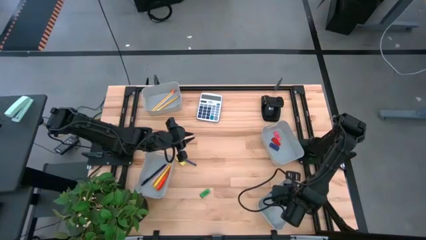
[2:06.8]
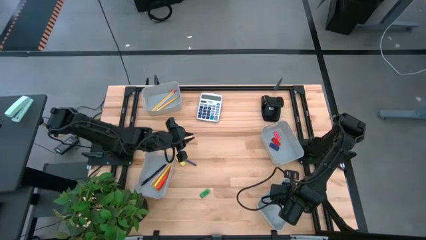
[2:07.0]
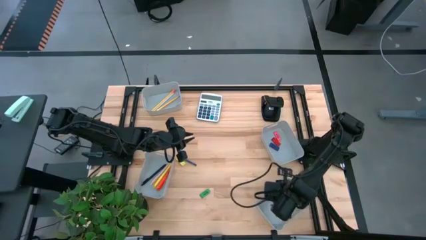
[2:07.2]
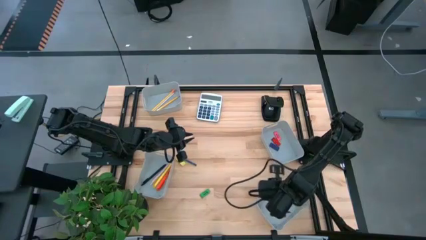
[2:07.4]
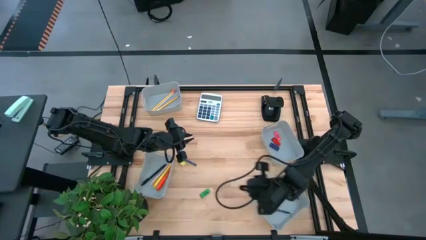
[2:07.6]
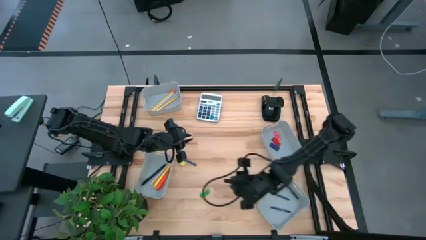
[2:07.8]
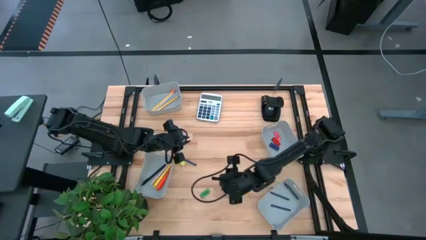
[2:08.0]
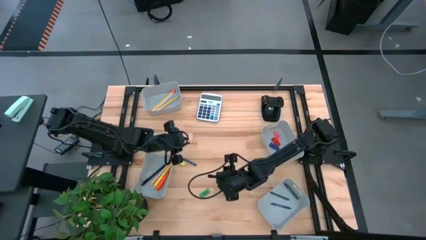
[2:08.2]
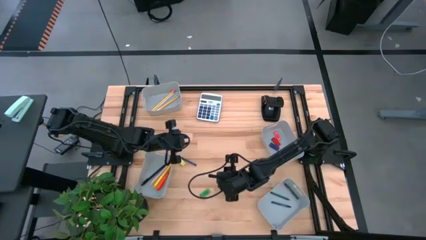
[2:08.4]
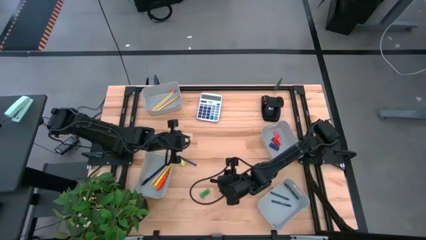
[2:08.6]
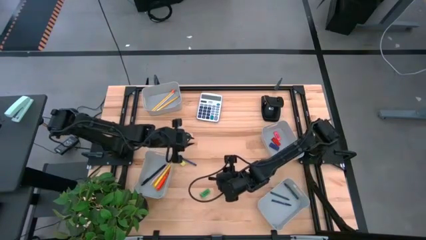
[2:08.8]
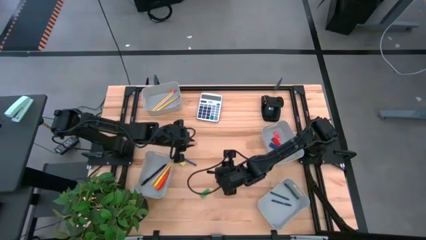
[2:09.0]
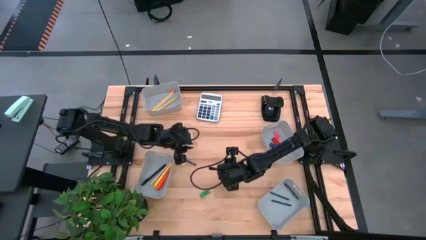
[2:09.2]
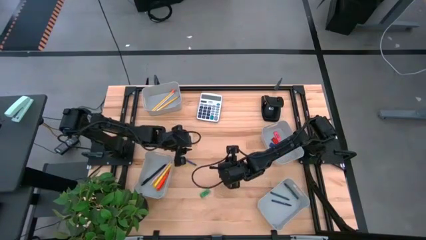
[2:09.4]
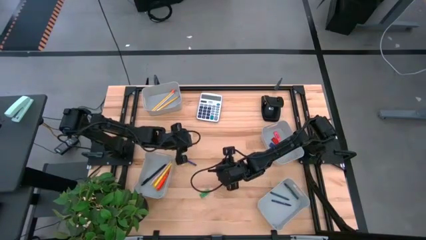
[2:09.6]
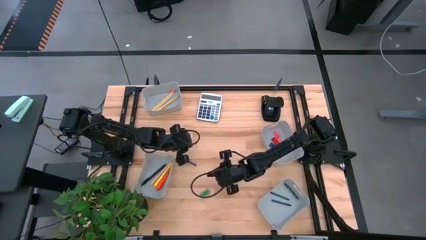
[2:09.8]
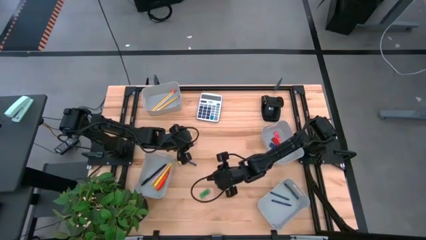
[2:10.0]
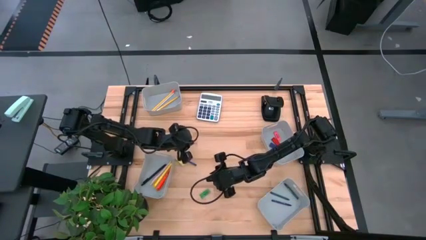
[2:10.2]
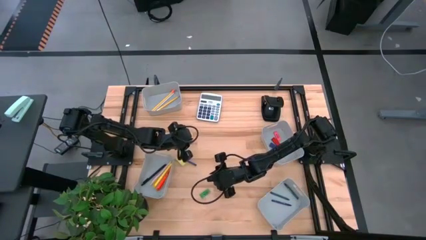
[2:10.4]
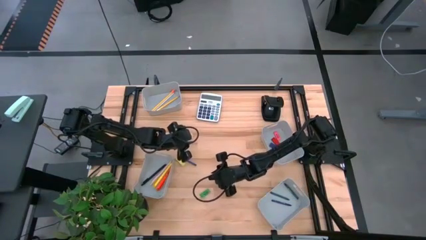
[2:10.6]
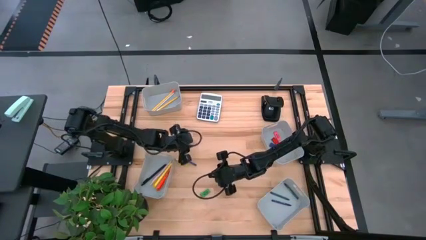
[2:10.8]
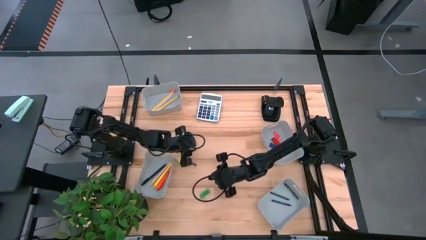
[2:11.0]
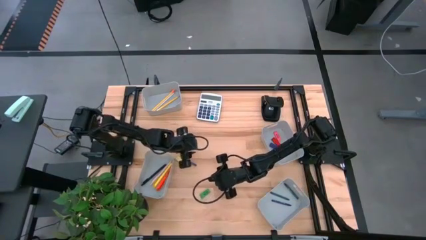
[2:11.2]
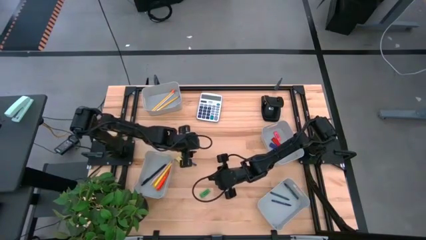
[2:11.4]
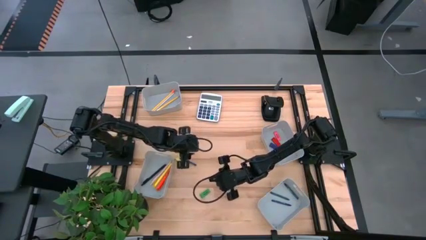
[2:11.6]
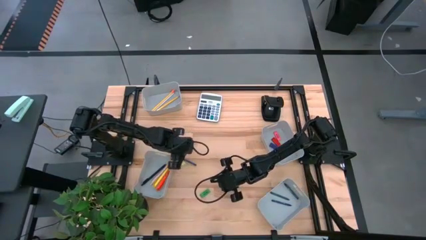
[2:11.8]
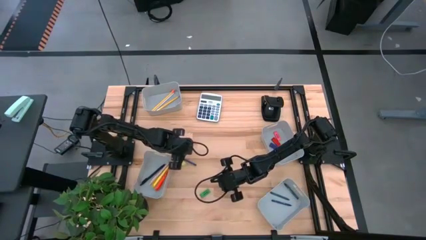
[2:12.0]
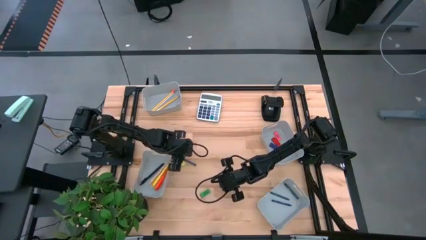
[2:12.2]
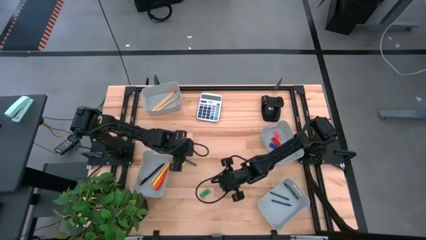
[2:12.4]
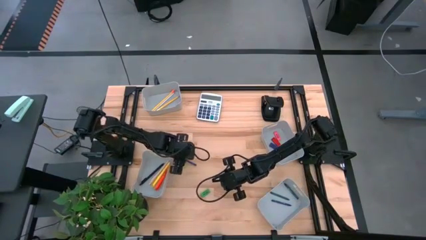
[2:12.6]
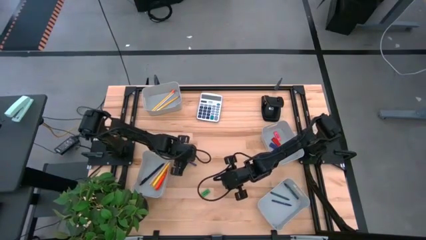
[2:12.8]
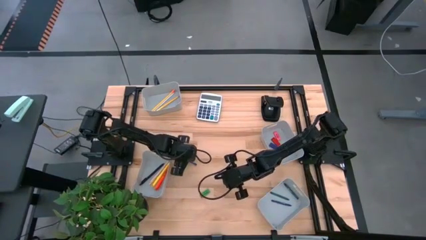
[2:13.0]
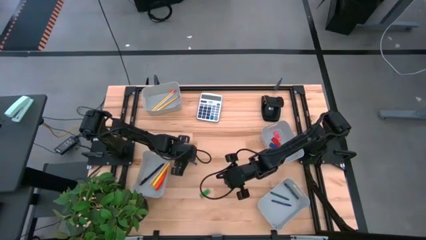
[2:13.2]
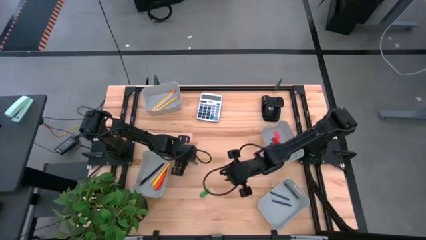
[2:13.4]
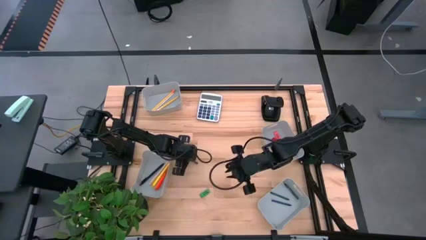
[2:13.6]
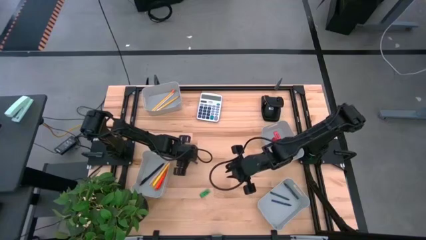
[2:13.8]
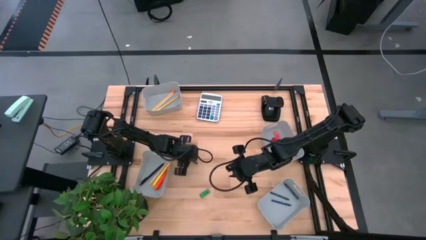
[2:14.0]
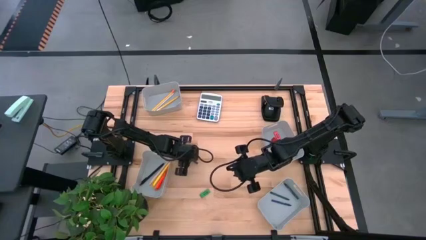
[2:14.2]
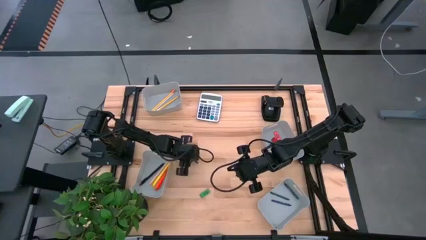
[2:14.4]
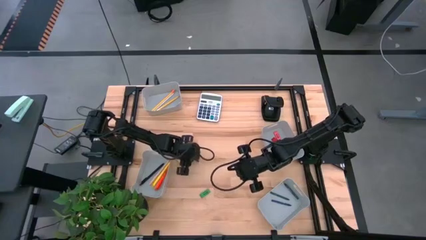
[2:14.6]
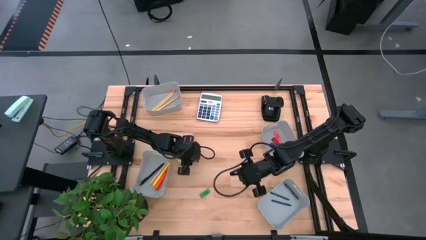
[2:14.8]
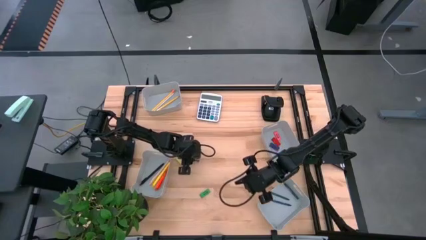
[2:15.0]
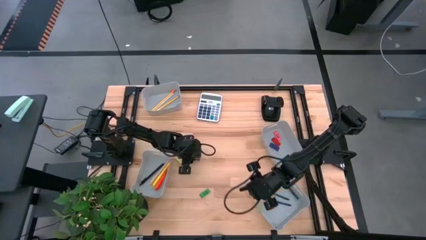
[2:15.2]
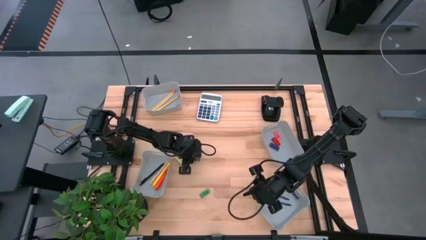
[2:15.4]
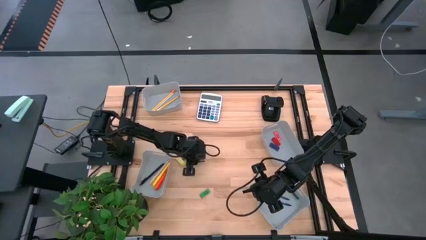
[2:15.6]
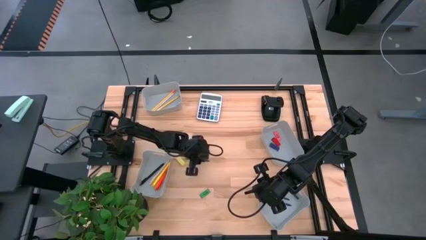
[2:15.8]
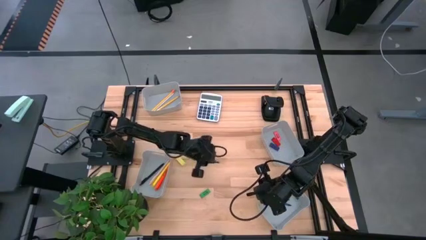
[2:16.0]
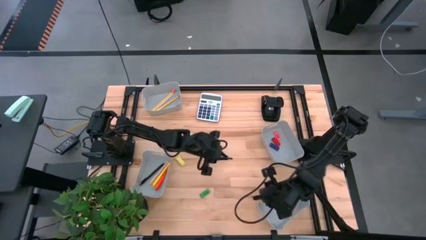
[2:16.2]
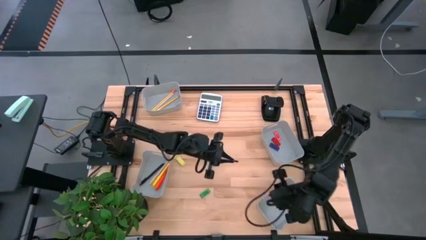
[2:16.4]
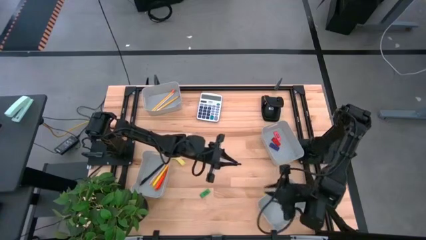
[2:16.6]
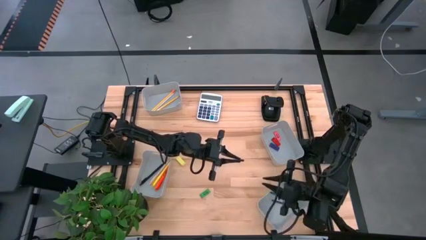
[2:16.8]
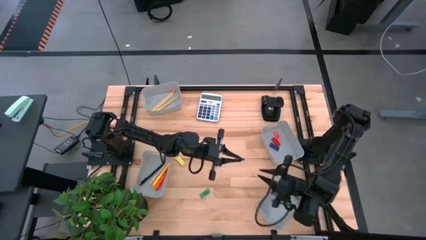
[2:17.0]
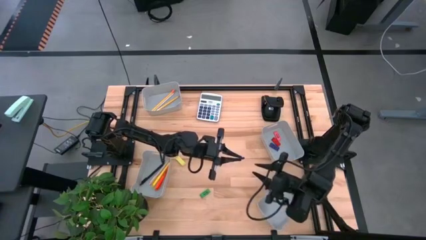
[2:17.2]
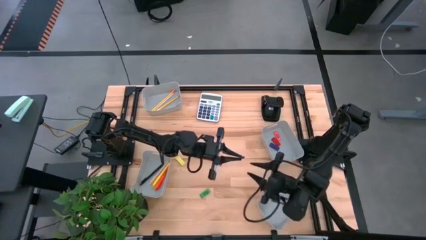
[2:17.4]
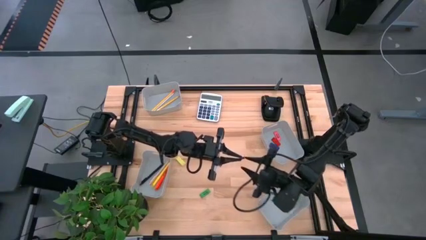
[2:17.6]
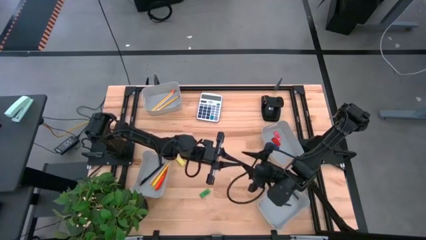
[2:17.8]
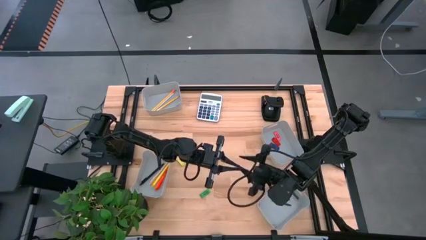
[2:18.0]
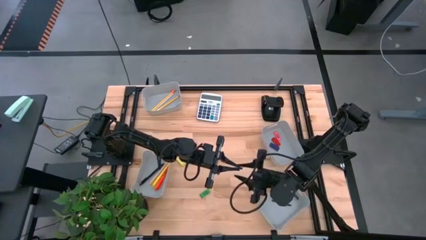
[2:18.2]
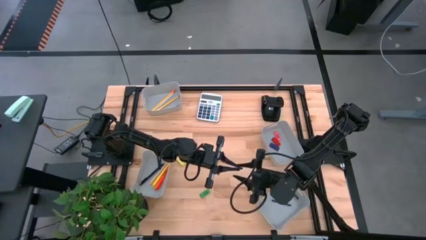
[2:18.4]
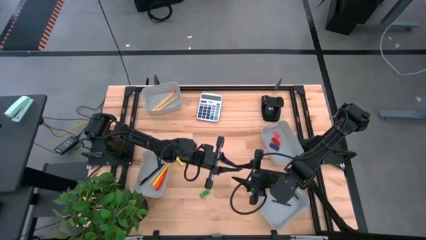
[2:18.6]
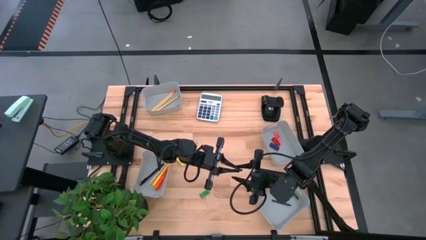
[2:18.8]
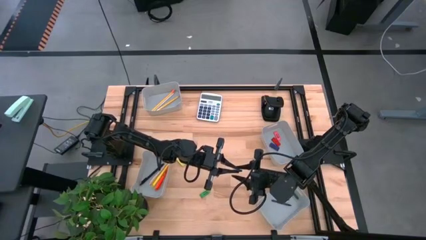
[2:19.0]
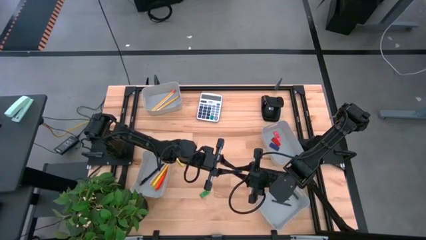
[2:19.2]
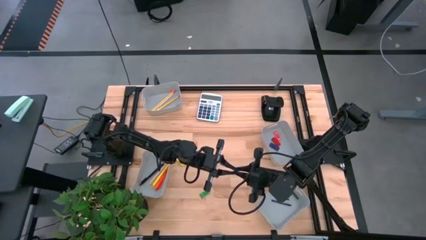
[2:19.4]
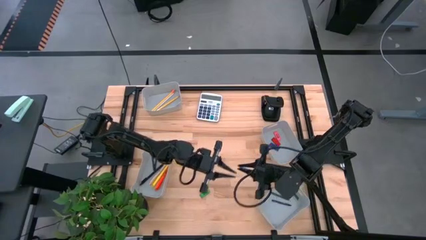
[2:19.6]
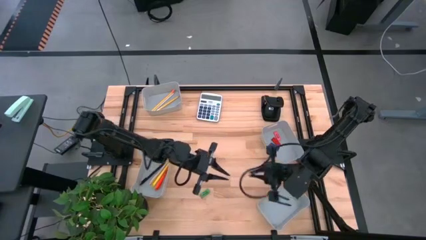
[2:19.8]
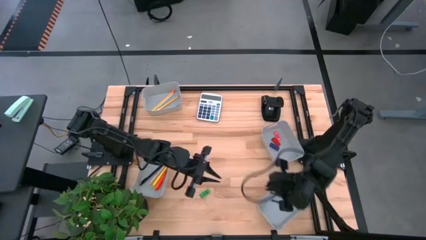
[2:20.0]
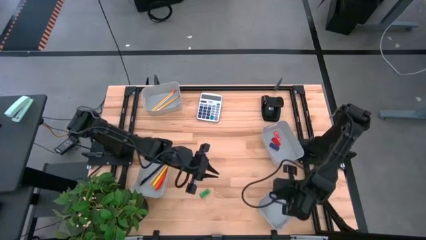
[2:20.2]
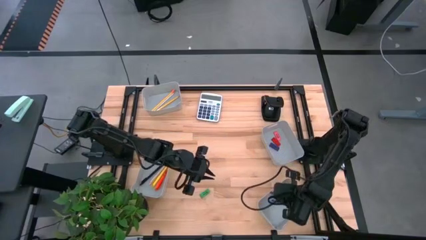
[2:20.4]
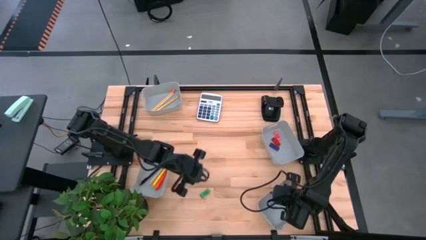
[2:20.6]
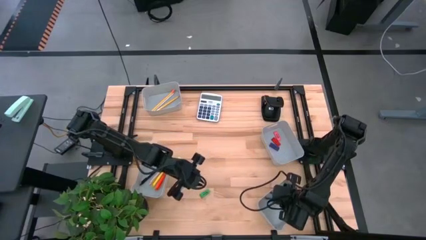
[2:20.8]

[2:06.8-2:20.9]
Task: Sort crayons/erasers/pens/pencils in bins
Put the blue crayon into the bottom right gray bin

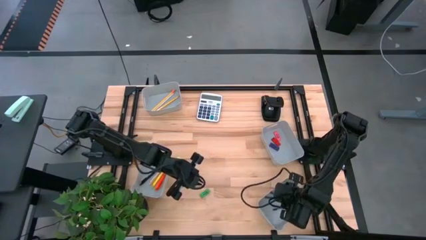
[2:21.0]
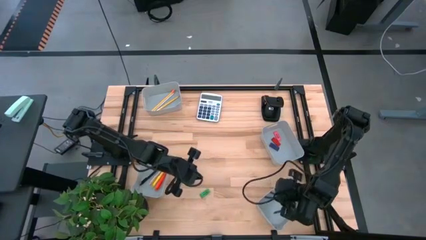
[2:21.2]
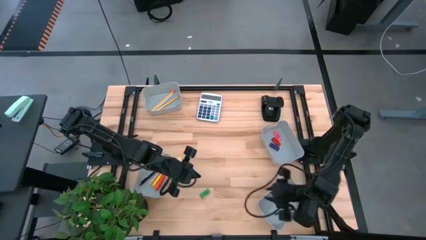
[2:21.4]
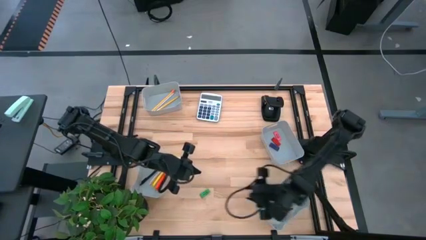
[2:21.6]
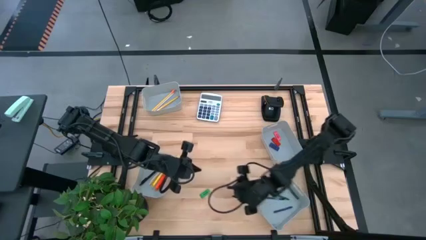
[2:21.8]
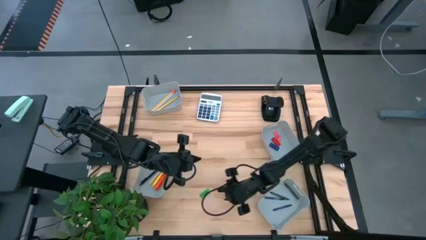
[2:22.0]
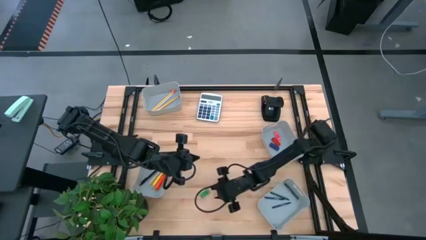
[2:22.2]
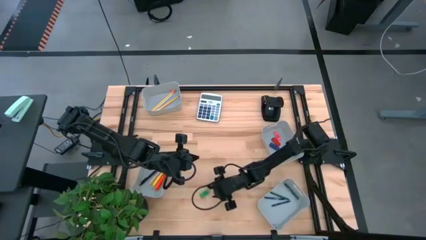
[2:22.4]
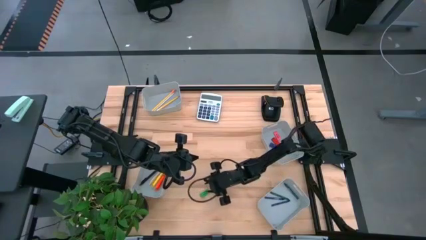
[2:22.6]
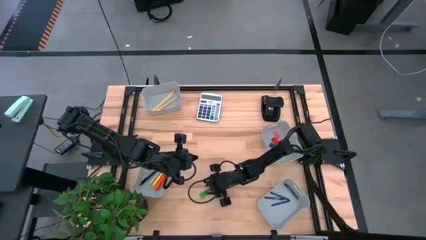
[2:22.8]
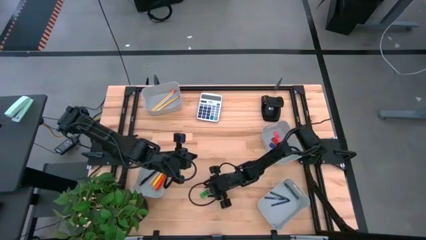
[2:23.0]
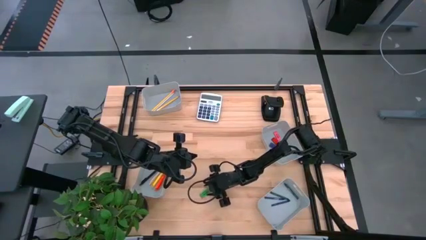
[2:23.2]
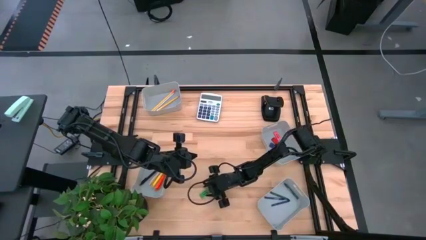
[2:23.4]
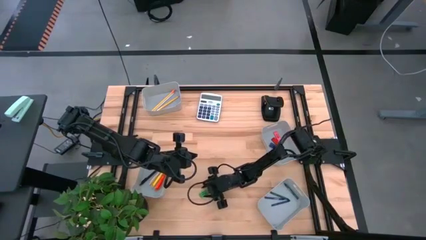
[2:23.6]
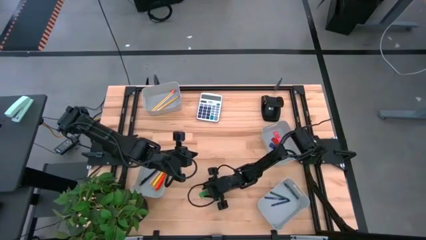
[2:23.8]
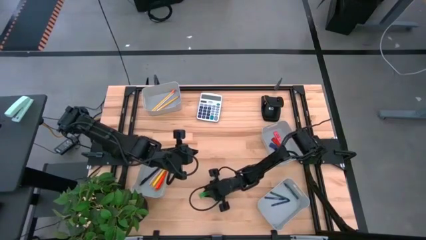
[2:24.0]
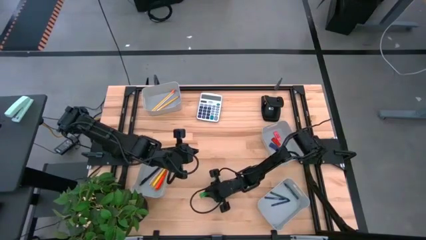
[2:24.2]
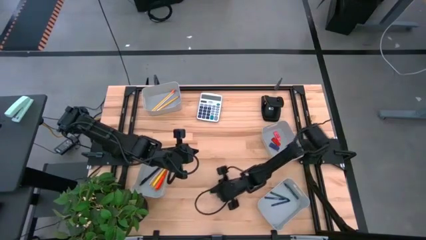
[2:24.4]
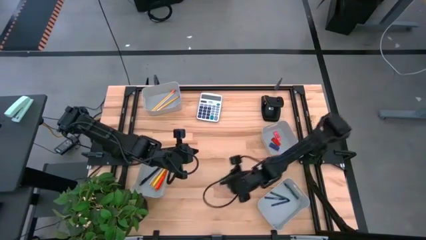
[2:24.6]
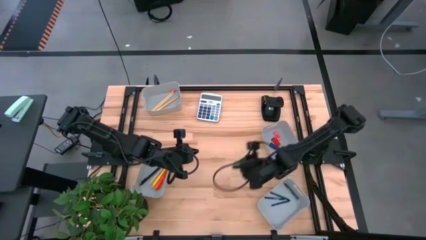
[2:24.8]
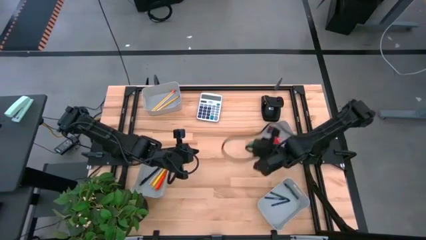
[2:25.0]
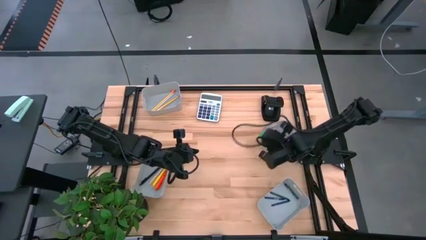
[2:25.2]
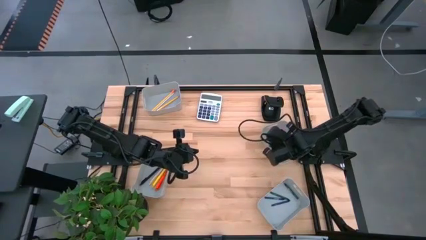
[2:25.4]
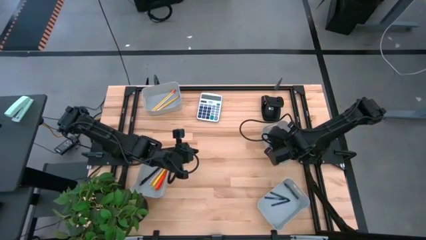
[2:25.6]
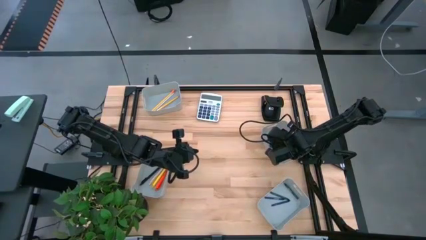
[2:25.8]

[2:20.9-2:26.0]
Put the green eraser into the top left gray bin
